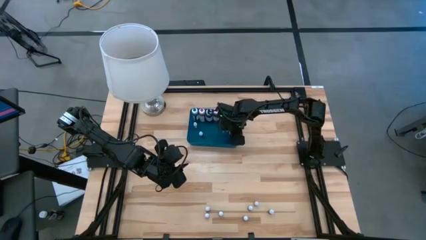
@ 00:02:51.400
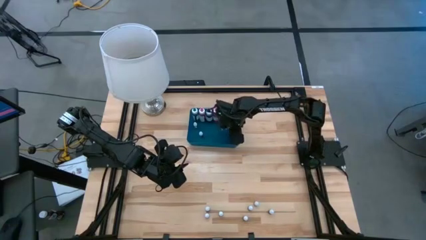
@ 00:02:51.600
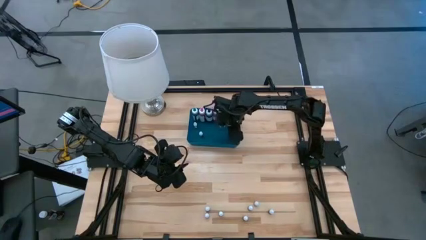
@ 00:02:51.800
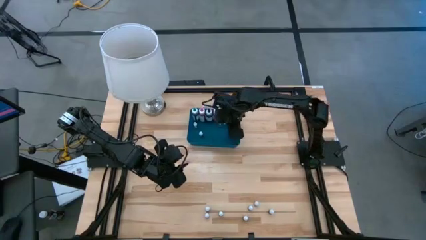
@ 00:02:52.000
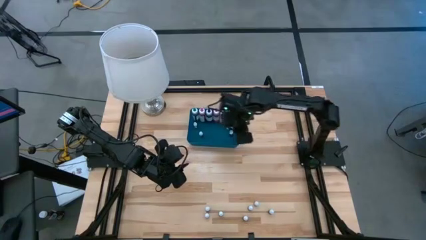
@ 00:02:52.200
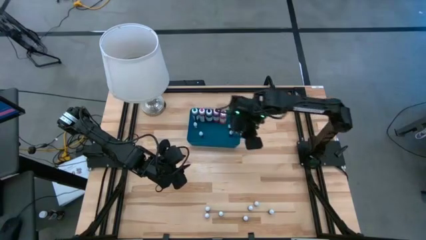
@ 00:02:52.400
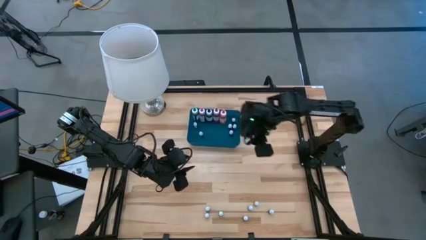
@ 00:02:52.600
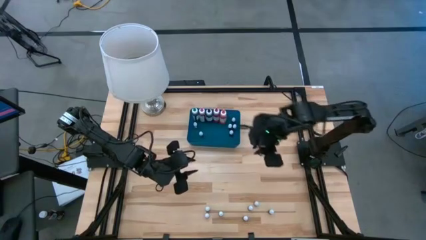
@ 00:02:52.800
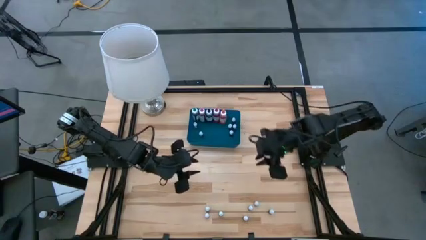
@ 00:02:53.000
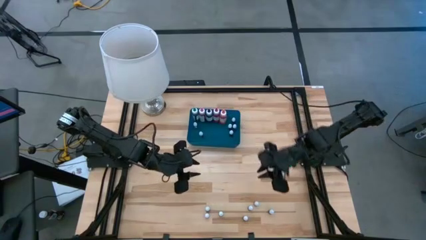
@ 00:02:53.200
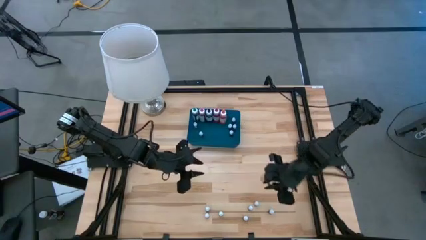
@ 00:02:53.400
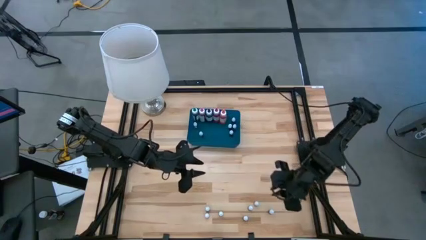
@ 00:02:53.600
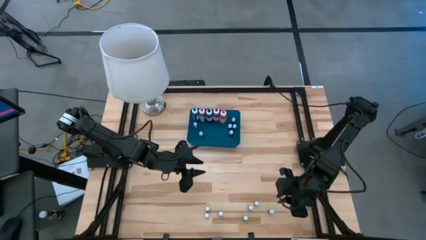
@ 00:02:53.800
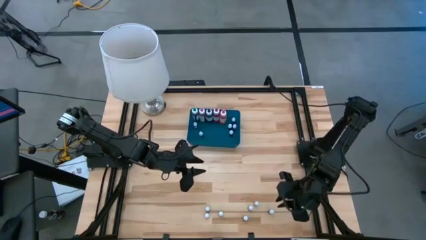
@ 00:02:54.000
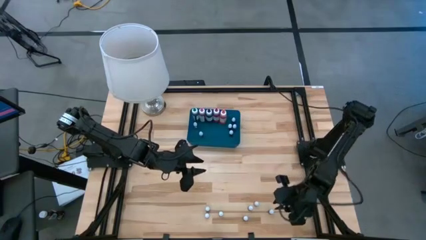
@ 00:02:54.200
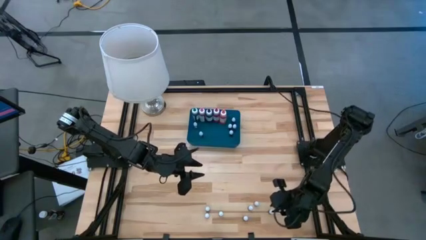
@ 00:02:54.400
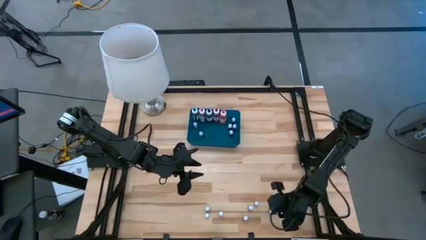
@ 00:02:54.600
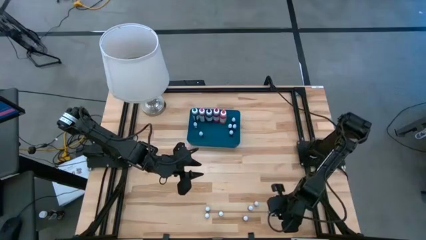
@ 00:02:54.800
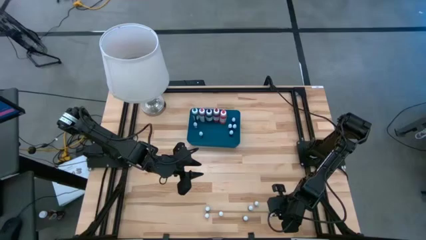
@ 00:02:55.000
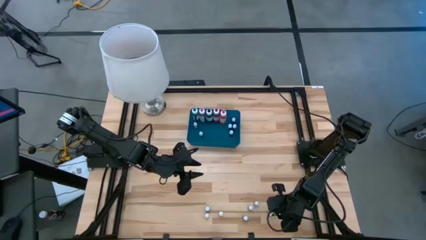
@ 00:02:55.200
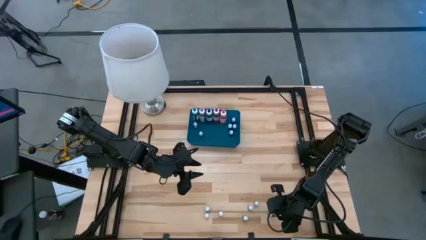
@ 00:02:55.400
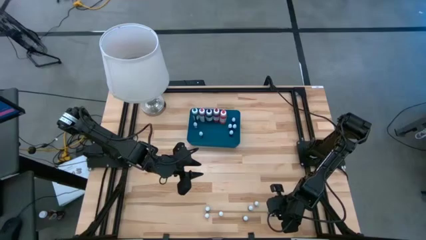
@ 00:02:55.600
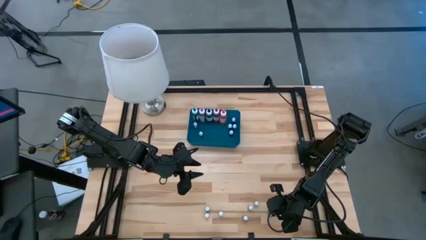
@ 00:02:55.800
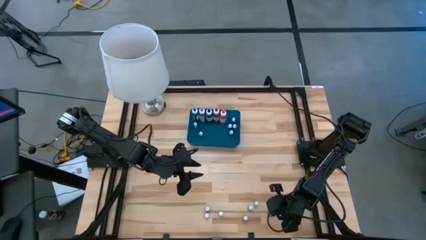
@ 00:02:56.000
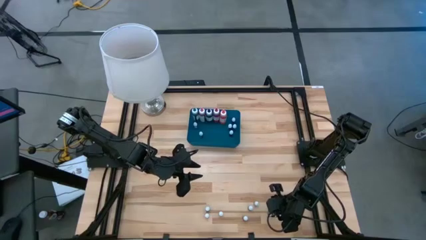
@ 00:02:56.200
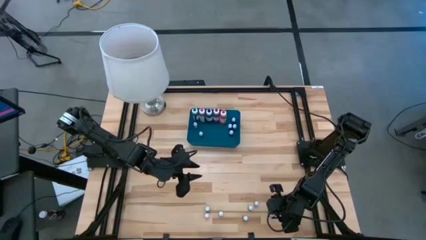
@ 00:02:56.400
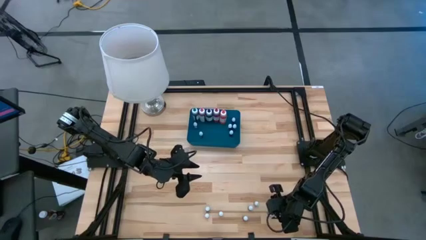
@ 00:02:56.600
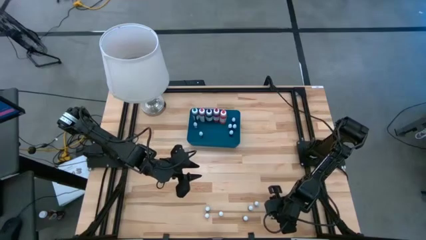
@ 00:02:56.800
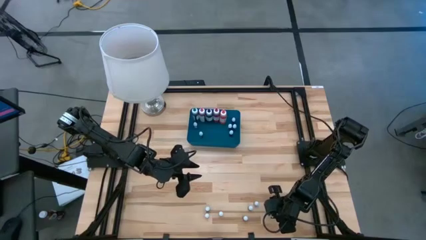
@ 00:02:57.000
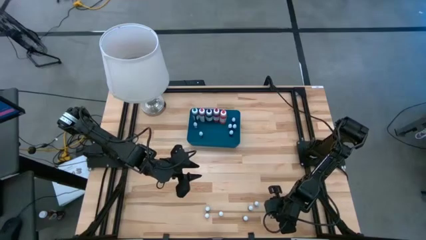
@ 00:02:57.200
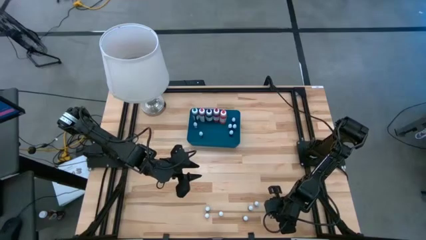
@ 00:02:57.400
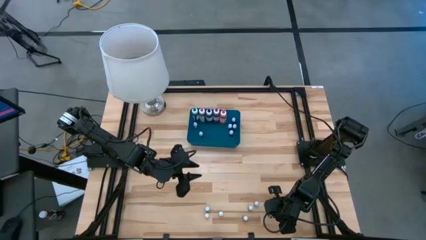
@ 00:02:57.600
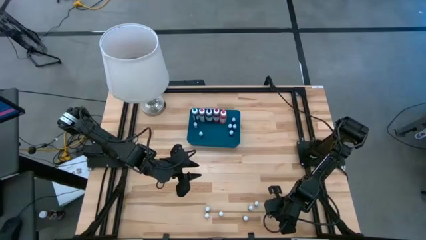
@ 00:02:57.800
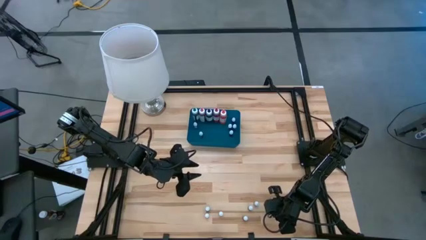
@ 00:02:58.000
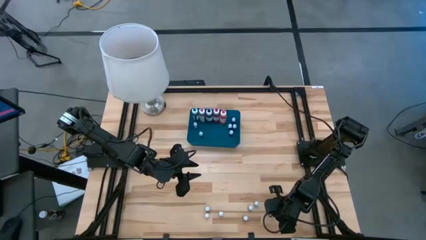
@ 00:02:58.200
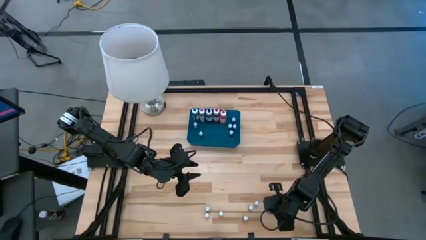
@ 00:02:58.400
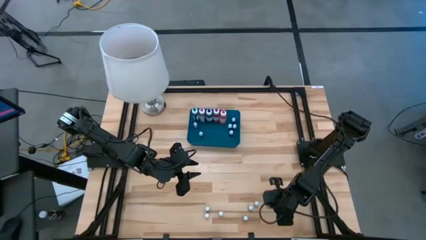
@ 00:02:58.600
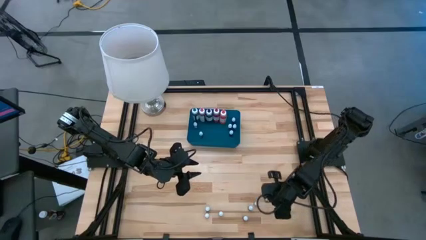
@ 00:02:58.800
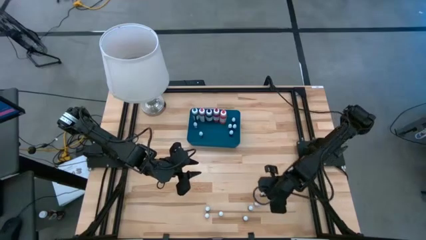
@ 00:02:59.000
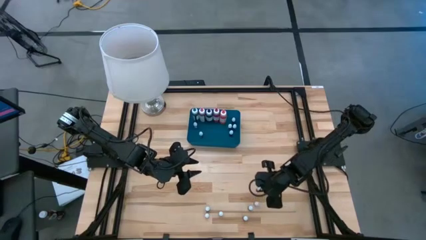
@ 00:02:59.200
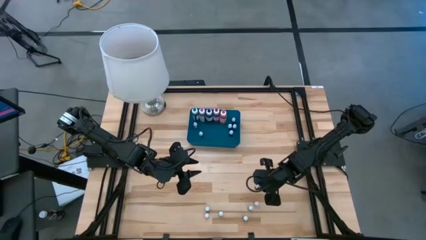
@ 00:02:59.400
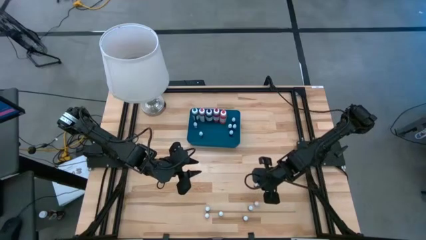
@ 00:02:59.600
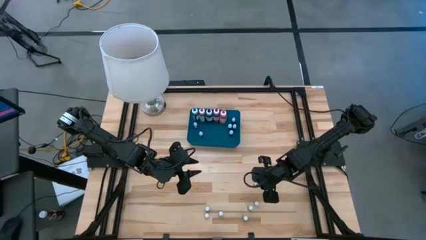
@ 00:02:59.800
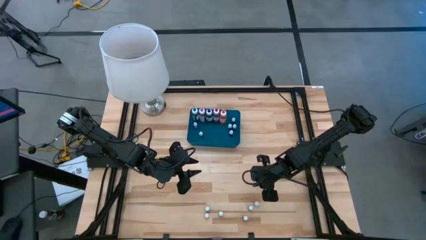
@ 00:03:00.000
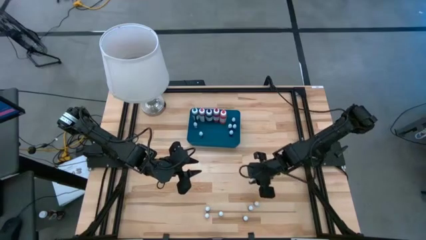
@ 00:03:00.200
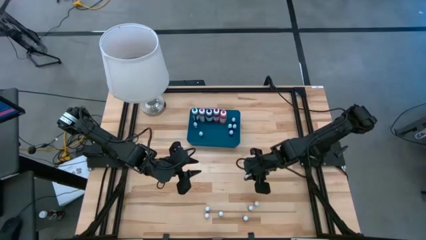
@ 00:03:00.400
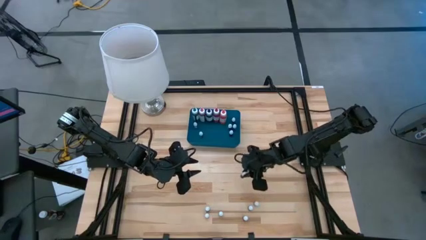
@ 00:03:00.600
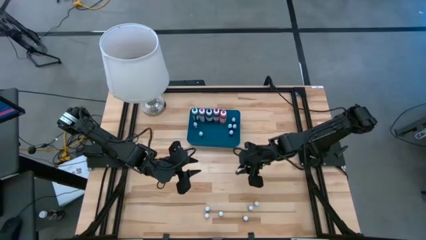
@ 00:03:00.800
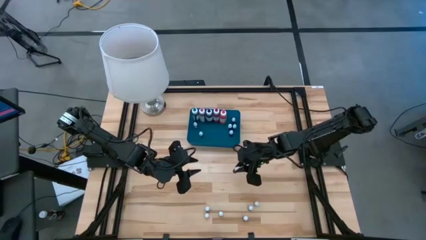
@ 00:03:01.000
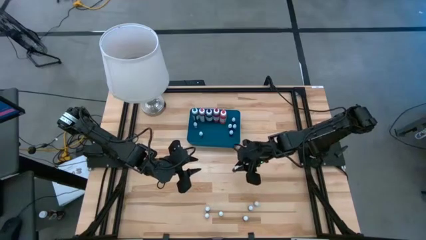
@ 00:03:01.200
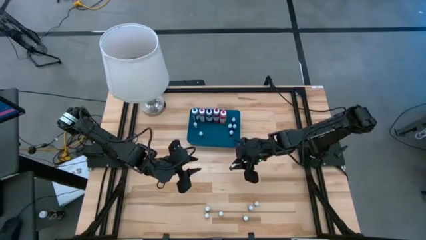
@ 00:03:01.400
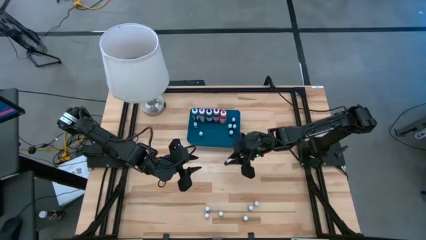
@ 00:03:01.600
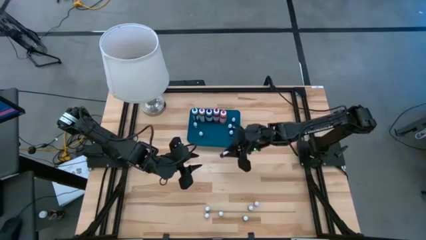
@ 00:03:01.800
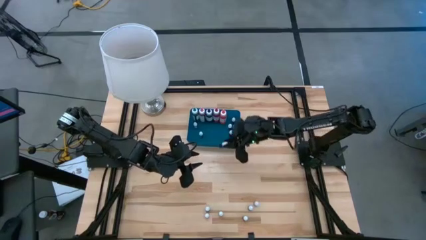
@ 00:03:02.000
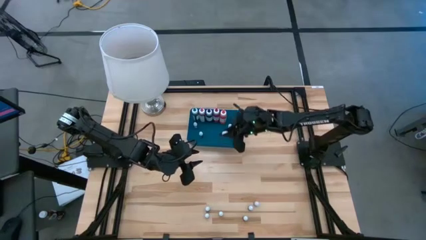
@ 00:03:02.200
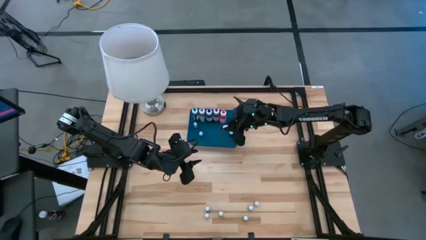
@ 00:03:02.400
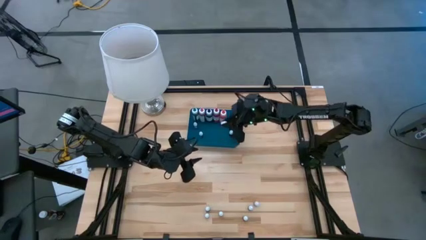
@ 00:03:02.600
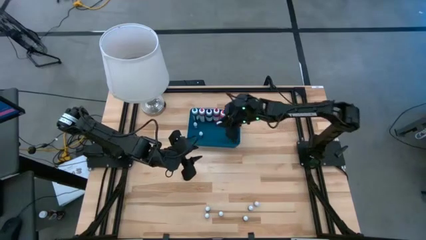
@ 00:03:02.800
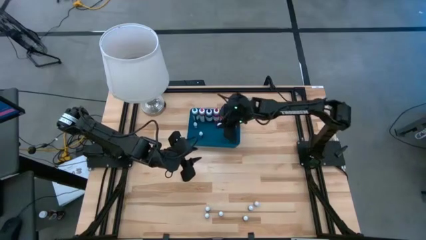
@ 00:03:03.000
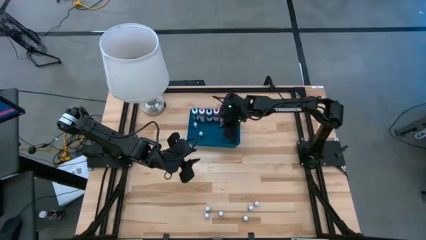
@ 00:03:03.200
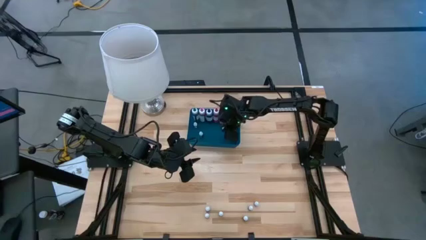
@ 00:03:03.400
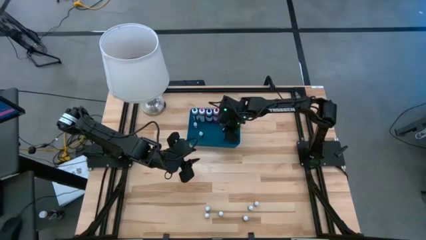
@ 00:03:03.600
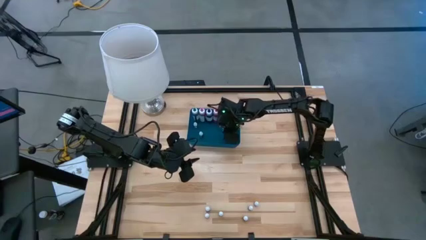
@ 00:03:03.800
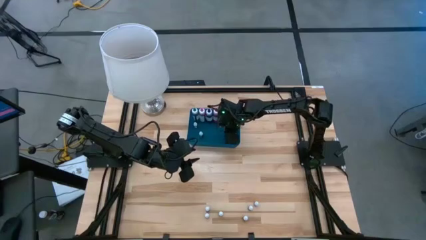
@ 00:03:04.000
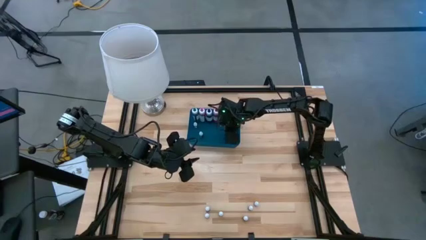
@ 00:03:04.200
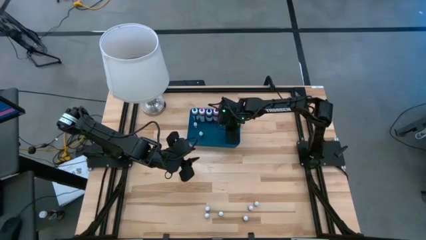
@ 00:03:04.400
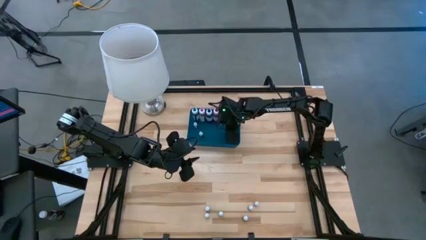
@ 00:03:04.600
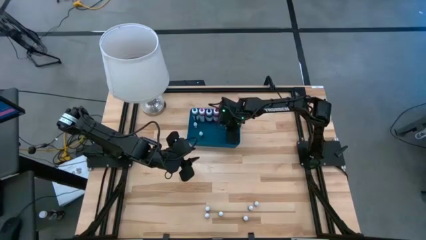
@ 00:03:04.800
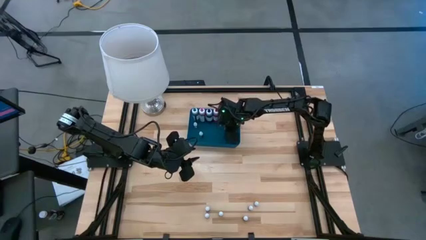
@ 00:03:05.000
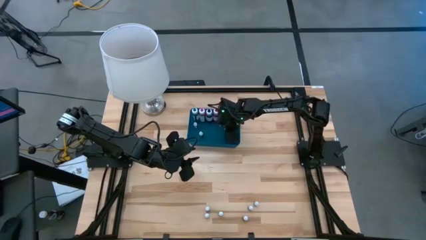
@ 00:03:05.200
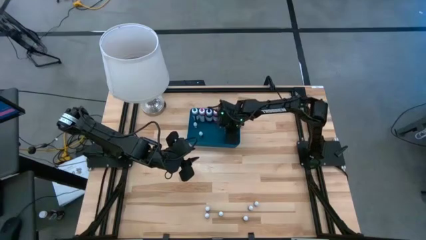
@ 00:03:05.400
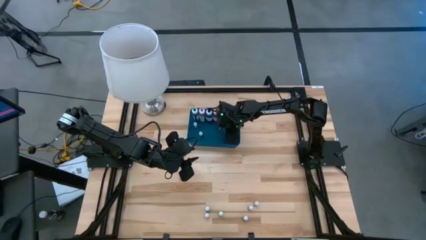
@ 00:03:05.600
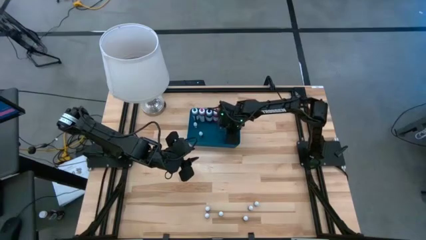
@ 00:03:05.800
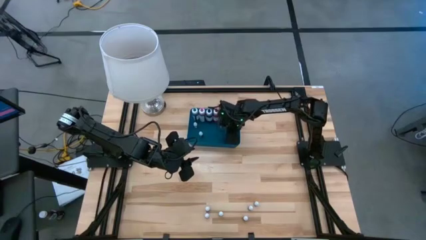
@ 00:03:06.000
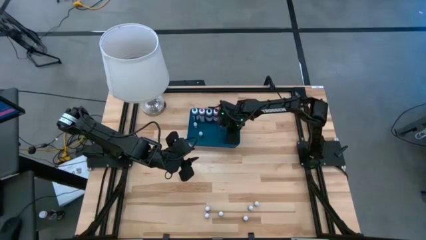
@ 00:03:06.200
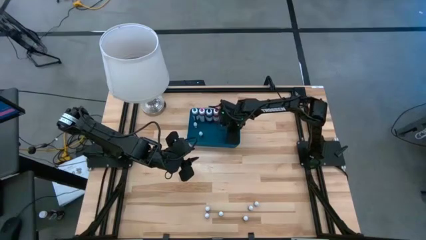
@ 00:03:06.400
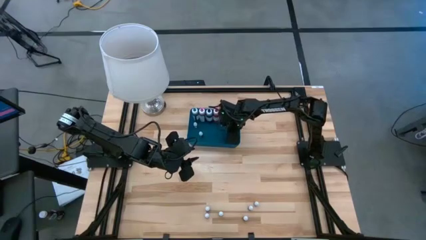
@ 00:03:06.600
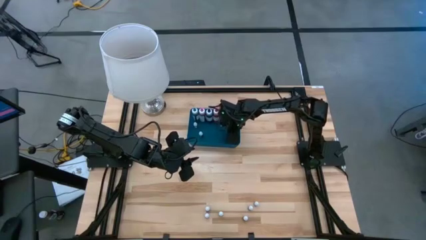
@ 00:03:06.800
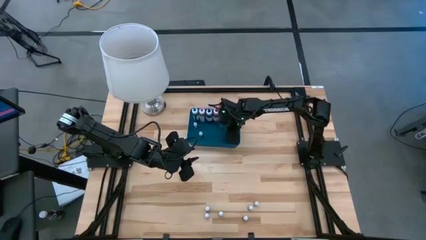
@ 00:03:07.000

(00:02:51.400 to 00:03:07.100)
Task: Pick & Place food coloring
Put the small black food coloring bottle into the bin
